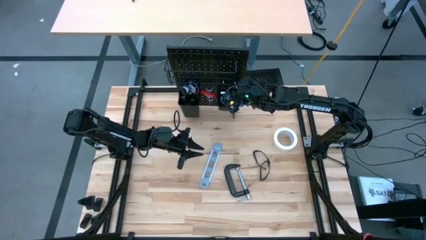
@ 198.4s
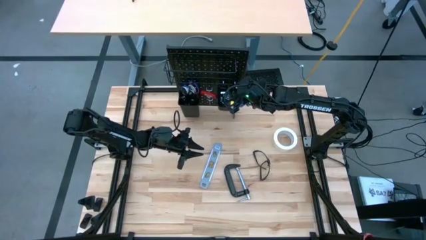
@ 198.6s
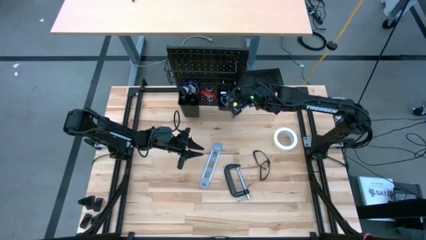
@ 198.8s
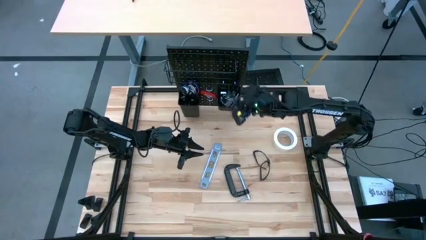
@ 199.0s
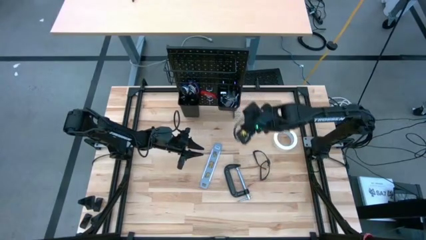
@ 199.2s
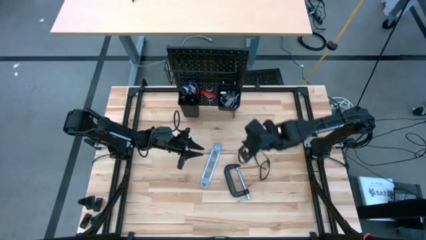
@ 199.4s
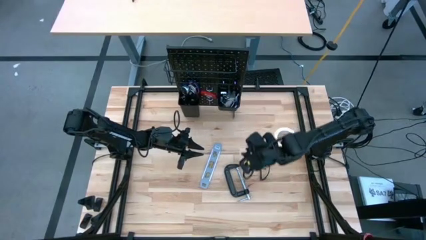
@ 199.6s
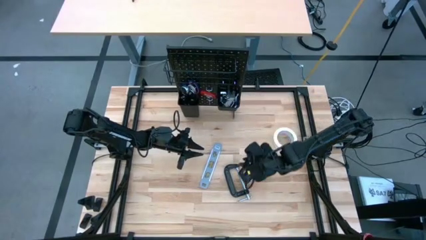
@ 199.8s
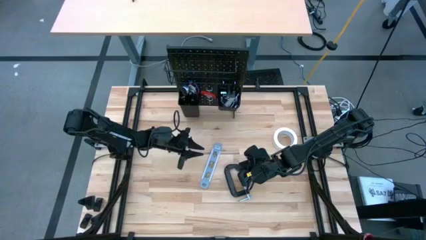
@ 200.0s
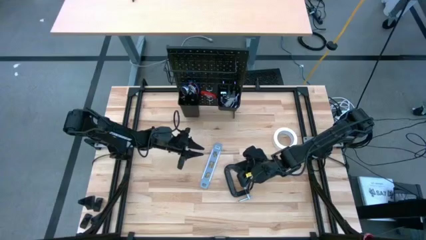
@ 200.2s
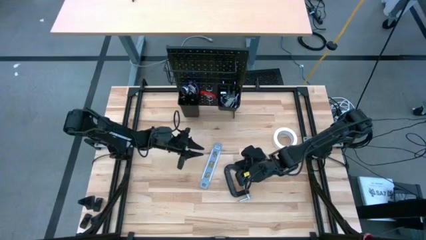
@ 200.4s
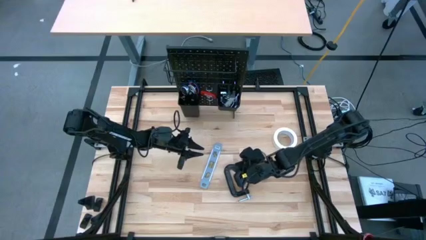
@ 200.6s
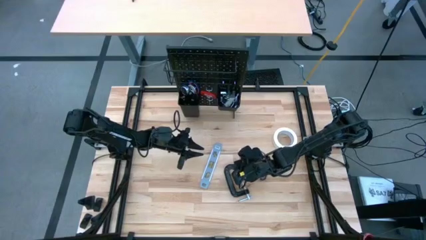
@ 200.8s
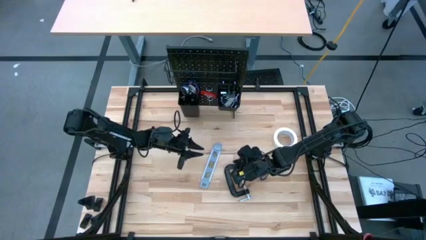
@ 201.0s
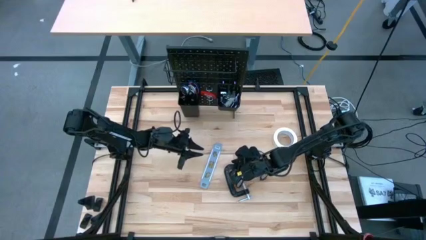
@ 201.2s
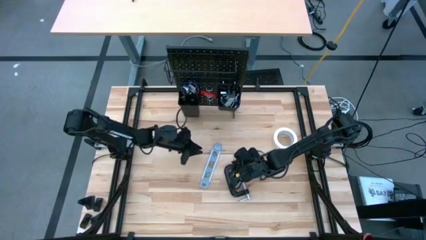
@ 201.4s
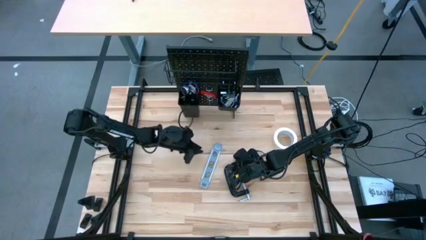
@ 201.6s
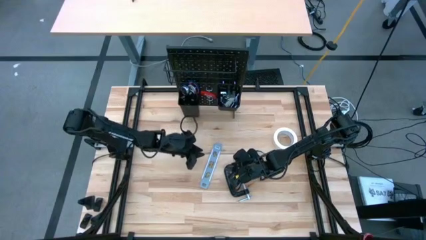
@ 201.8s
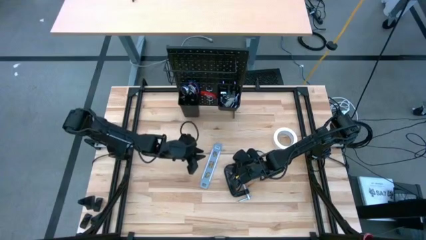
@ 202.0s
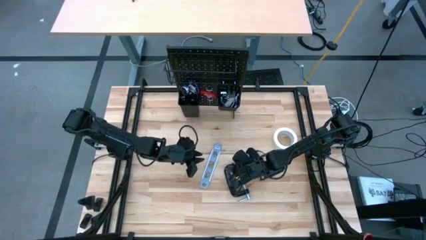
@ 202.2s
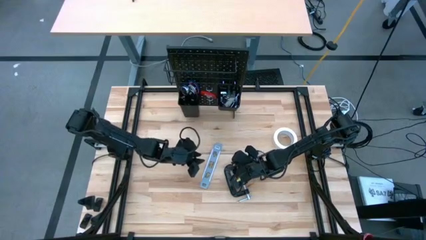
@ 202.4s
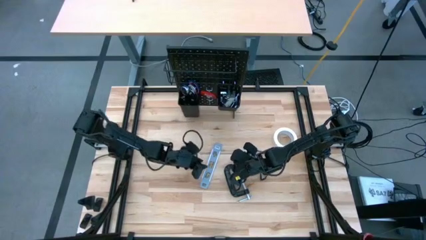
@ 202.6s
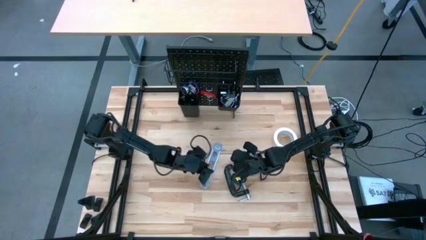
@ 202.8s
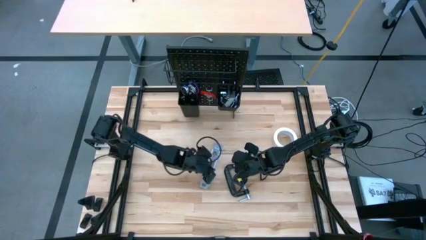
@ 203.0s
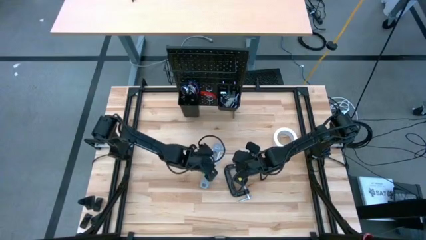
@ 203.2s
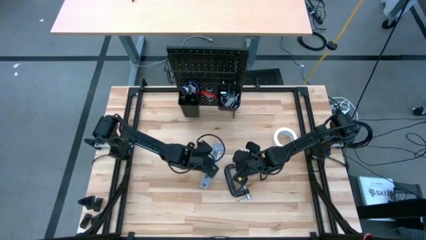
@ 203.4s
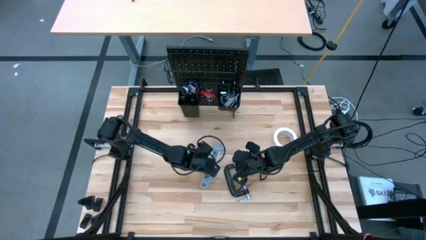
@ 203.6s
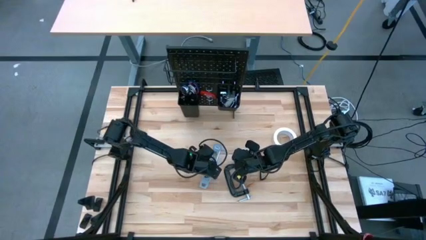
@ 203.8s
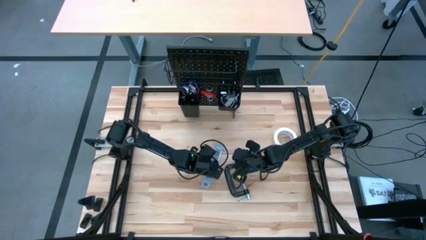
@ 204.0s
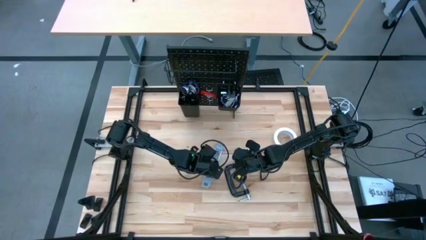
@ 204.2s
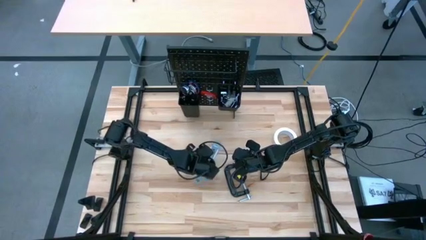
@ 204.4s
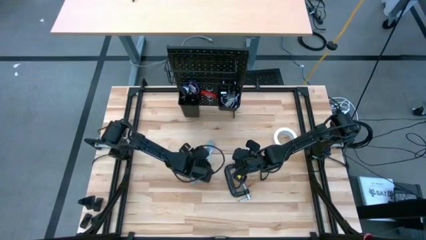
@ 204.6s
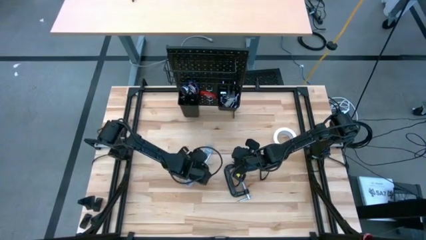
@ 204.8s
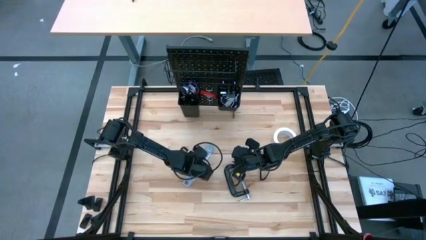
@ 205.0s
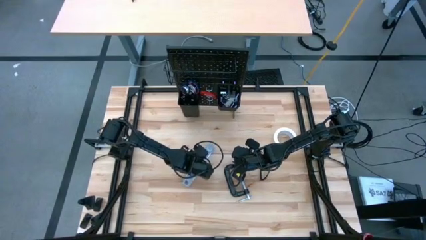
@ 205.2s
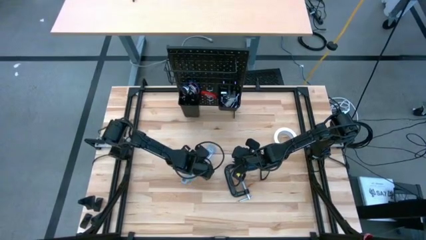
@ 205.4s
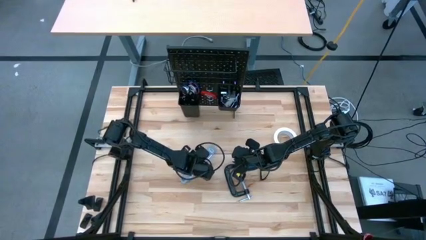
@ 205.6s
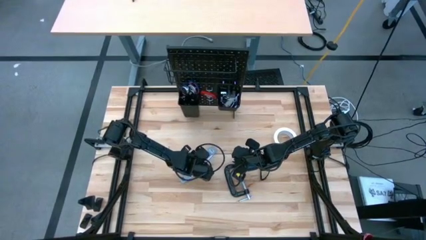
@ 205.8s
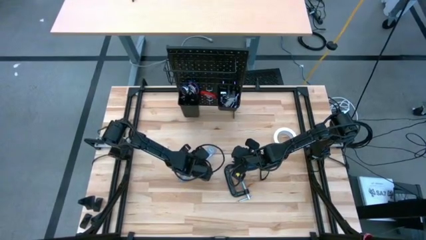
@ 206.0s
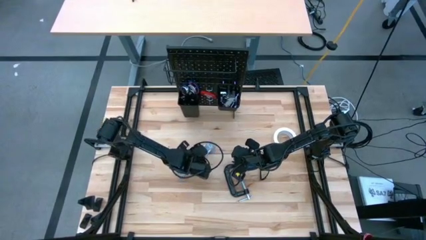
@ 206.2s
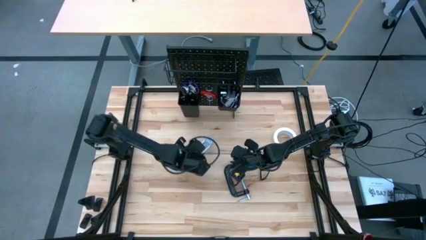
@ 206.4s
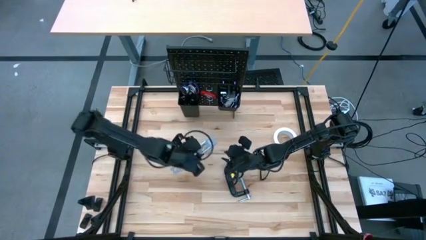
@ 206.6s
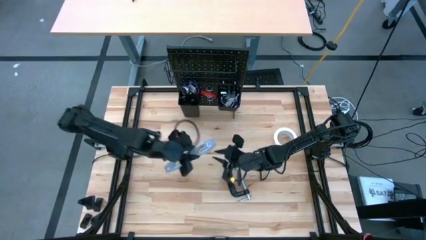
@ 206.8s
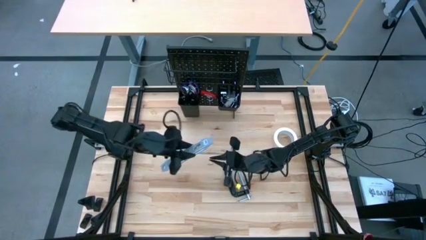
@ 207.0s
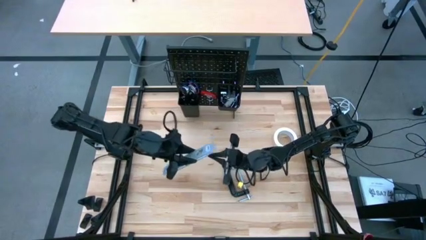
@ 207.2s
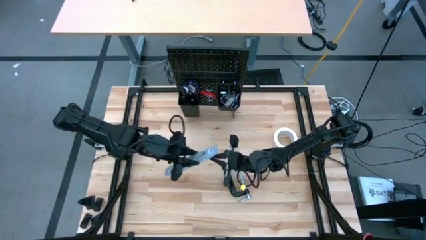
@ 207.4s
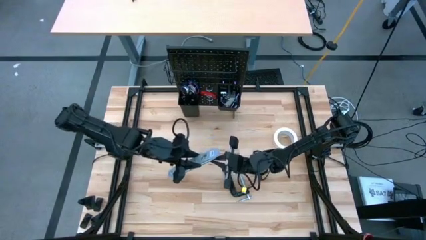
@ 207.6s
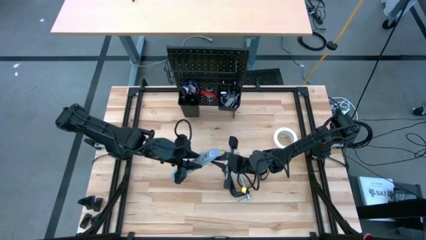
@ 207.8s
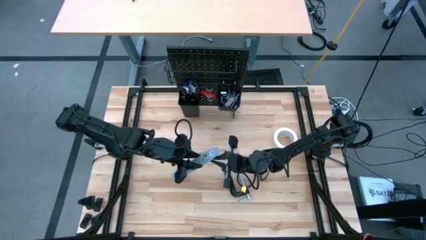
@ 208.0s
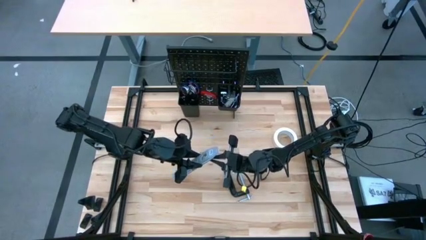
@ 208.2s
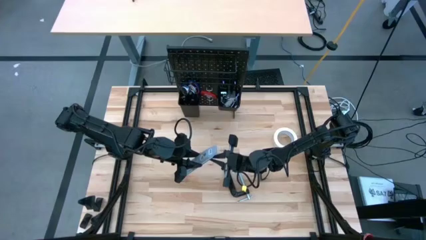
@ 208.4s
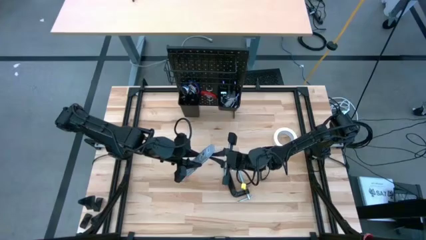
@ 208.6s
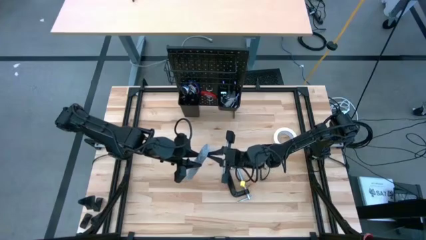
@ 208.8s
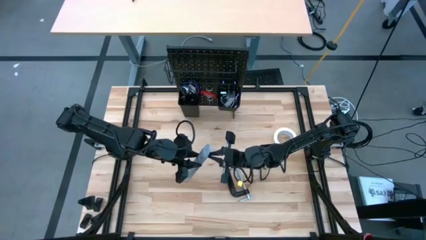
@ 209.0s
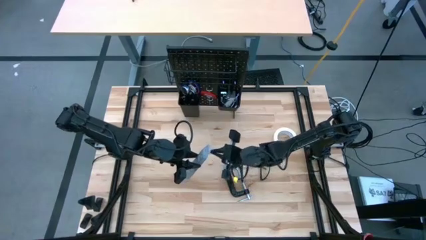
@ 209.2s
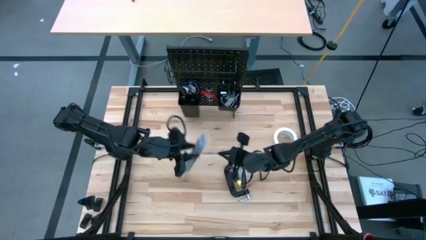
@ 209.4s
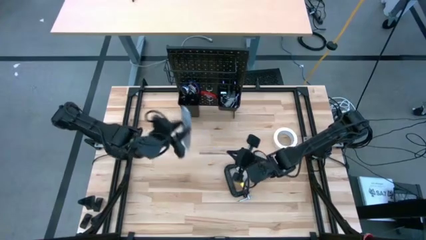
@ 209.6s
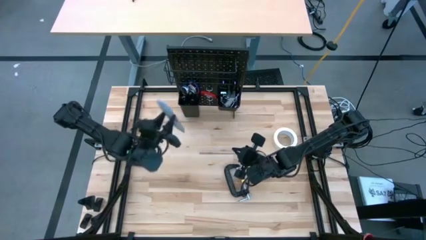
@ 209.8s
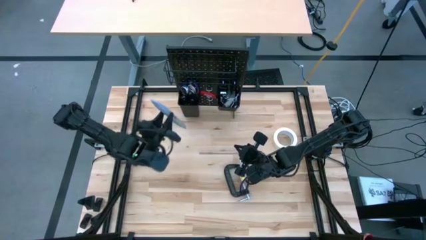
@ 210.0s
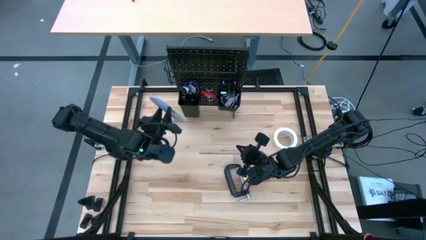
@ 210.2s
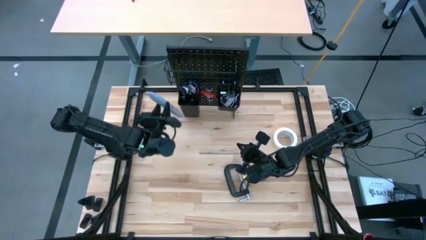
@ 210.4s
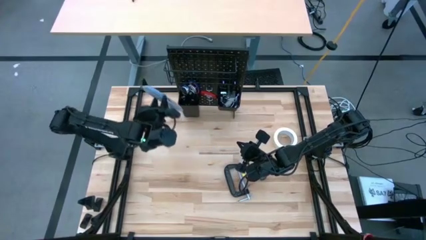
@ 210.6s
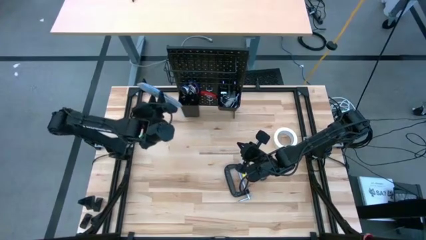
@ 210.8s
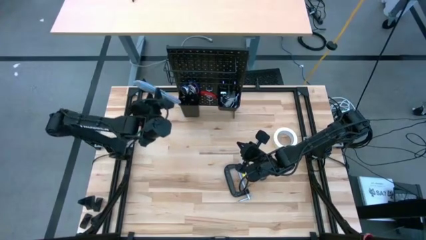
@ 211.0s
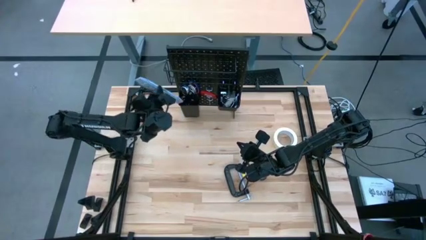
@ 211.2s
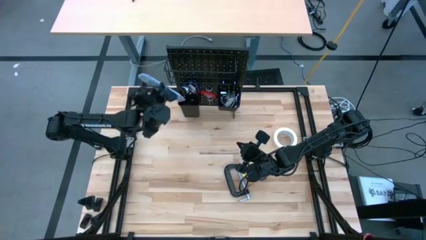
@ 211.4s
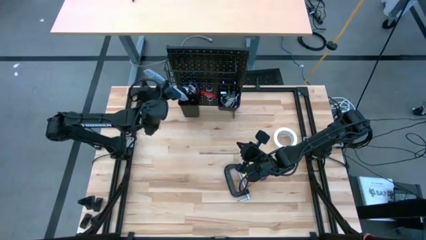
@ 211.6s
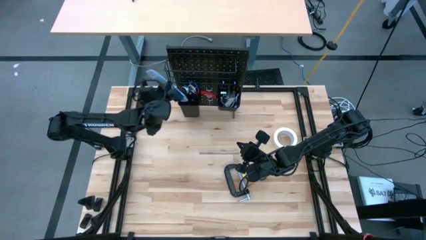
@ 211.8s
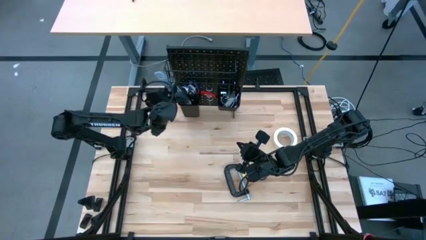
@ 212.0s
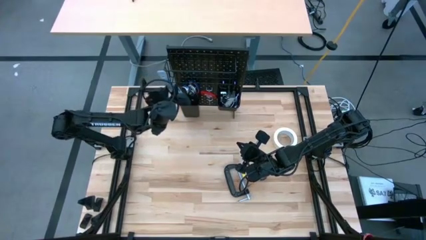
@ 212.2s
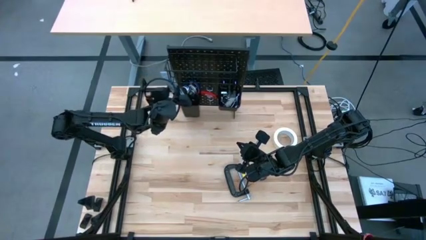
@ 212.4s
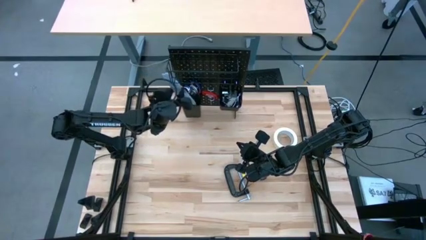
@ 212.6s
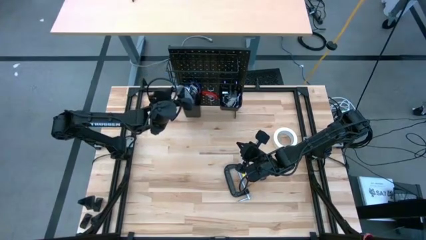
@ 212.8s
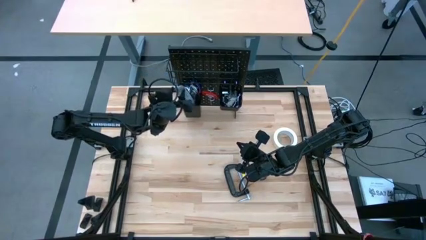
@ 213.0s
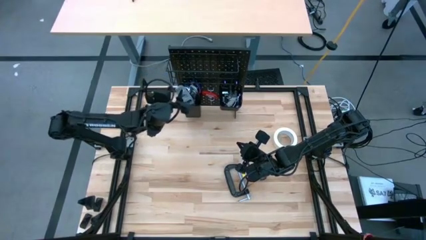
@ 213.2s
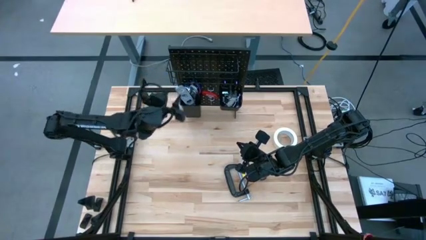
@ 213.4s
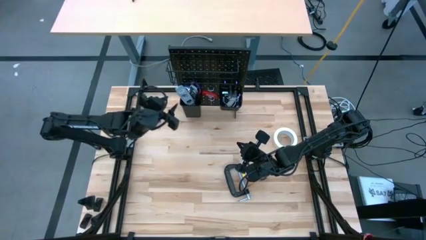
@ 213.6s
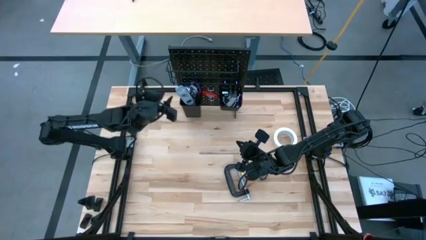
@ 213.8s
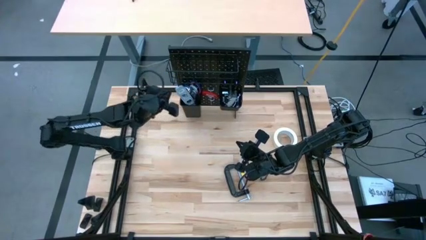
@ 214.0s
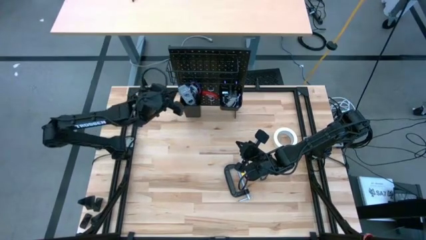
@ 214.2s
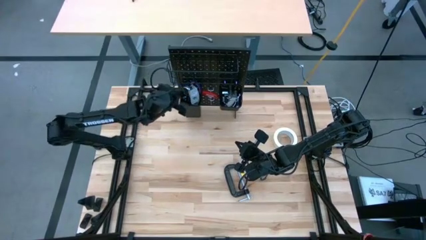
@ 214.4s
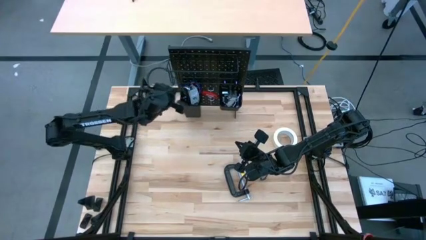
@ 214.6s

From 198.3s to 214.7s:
Task: Hang tools onto peg board
Put the torpedo level into the left black bin on the peg board
